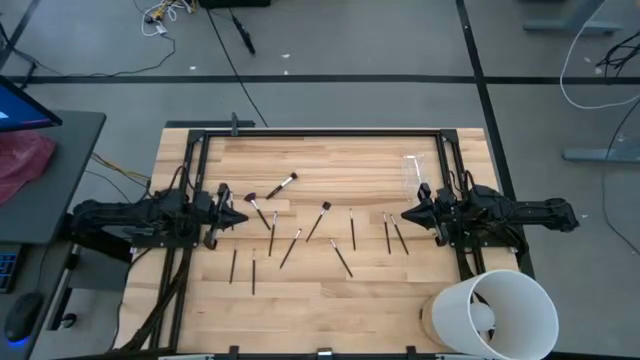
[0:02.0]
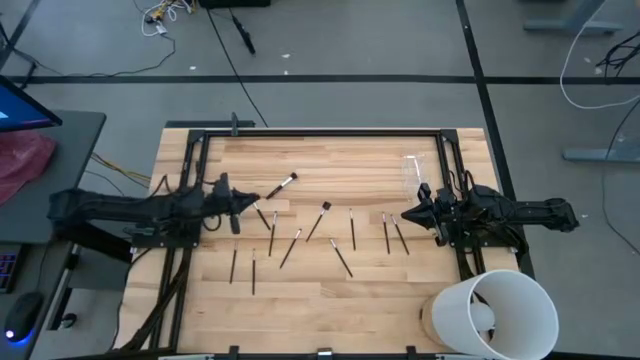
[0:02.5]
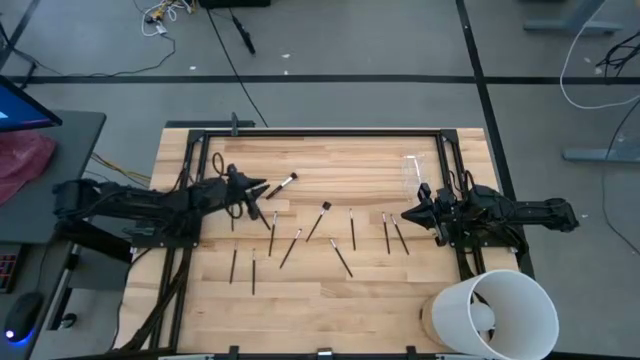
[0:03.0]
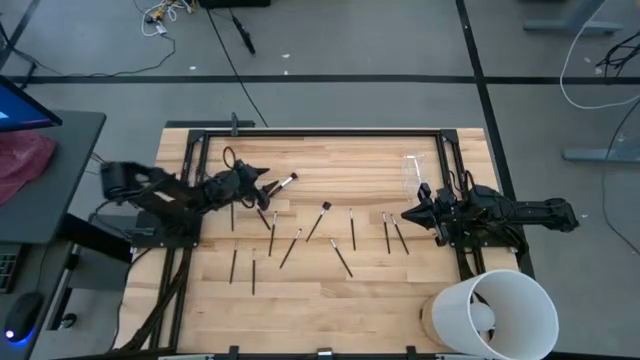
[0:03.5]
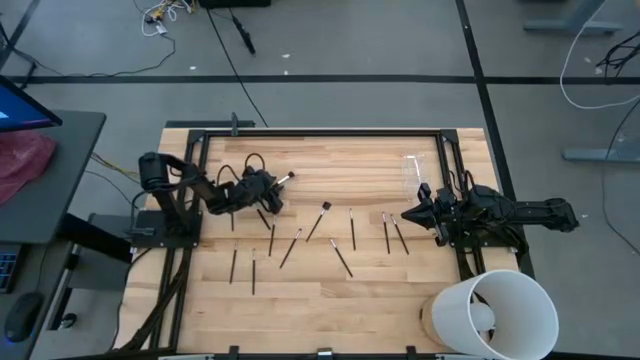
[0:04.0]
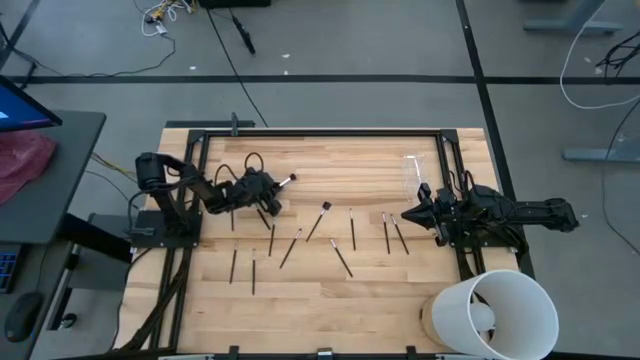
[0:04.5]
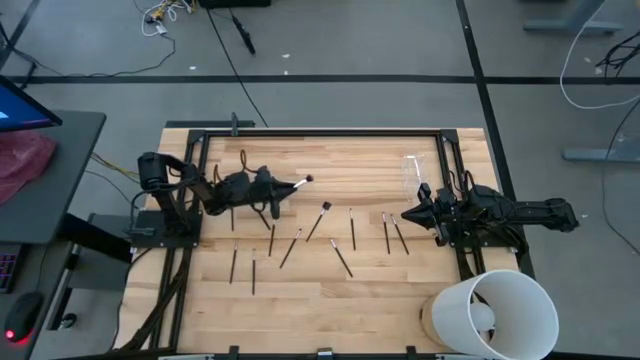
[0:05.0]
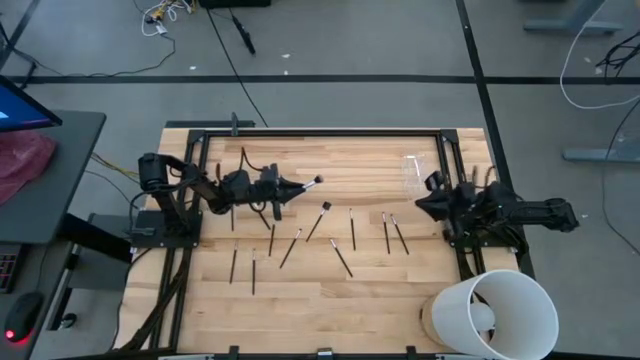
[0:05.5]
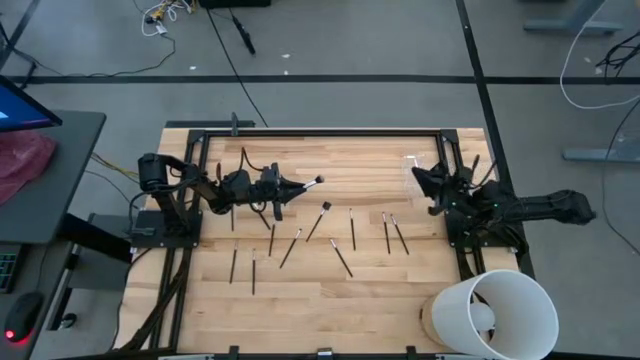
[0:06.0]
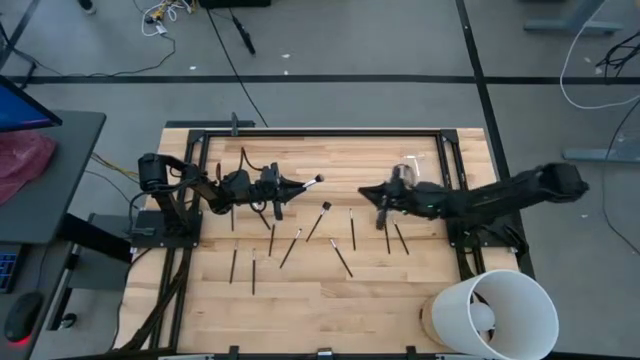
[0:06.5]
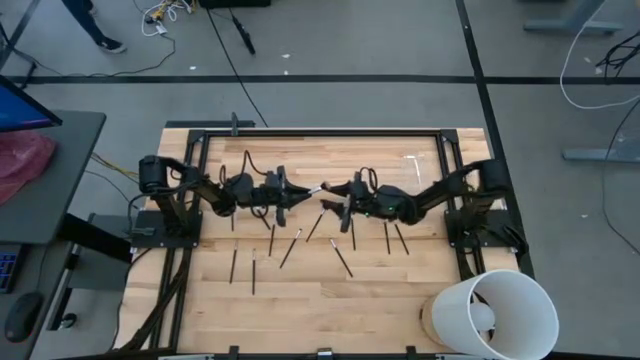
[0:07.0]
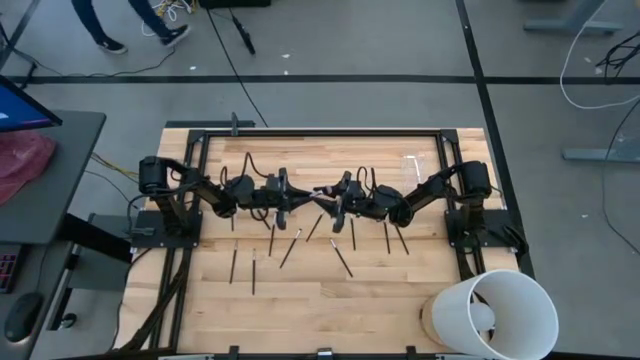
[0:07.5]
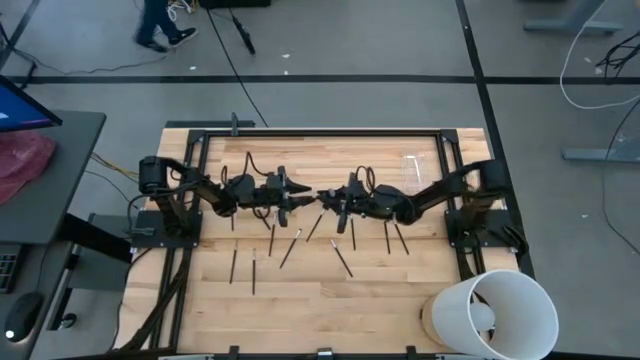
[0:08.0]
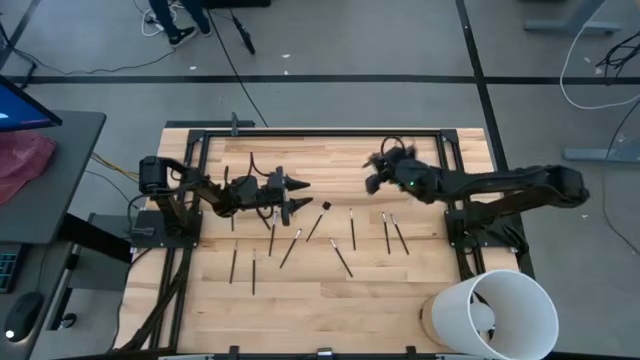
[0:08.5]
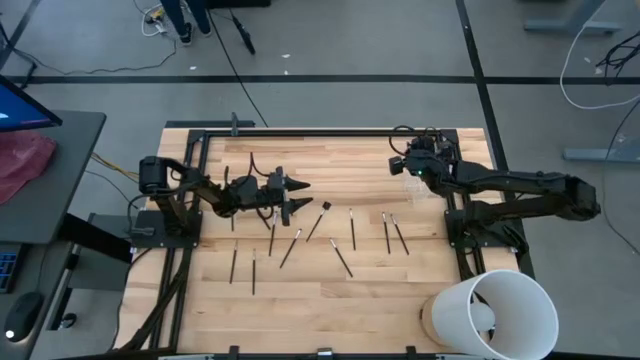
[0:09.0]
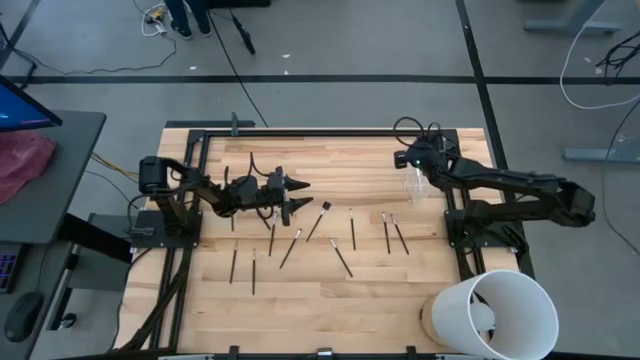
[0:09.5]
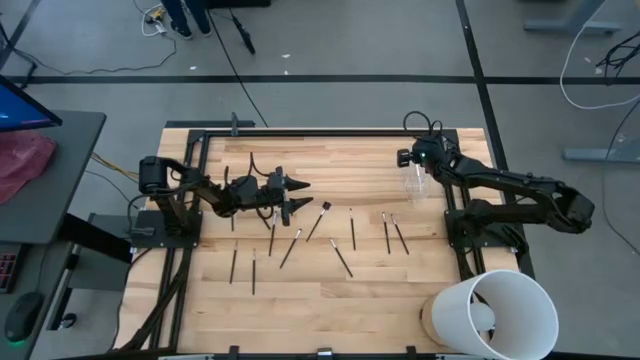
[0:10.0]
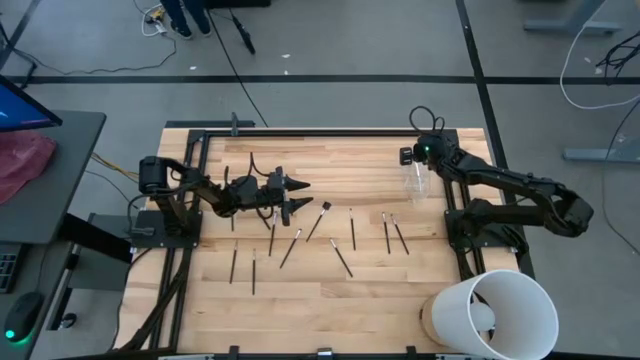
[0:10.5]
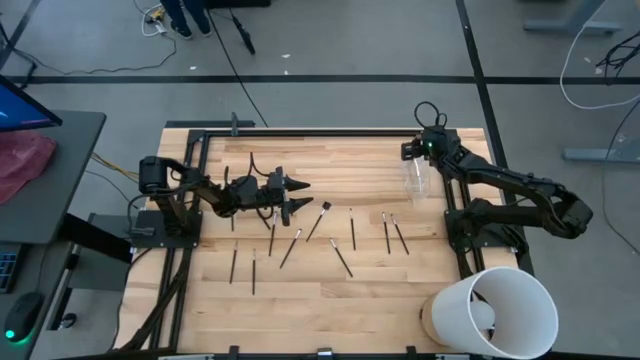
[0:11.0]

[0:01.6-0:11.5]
Task: Put items in baskets/containers
Put the powder brush into the transparent organizer

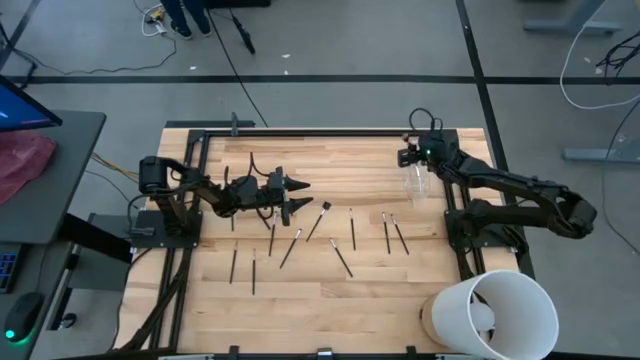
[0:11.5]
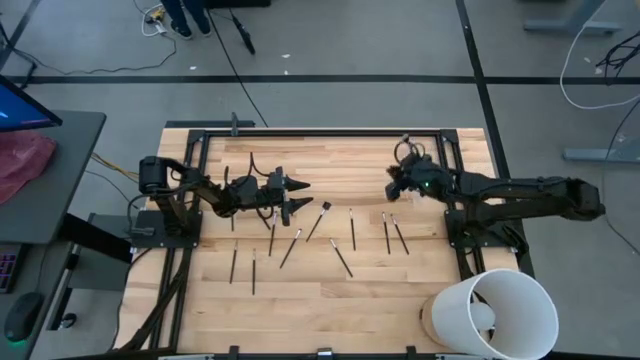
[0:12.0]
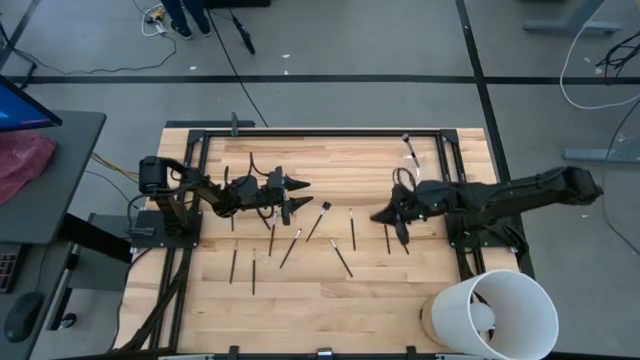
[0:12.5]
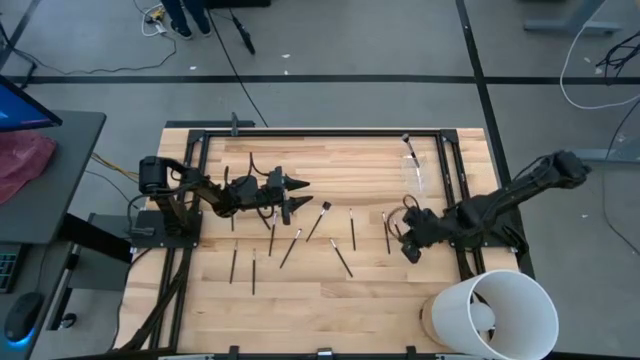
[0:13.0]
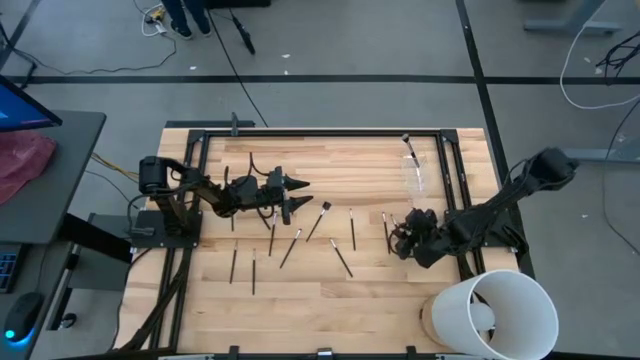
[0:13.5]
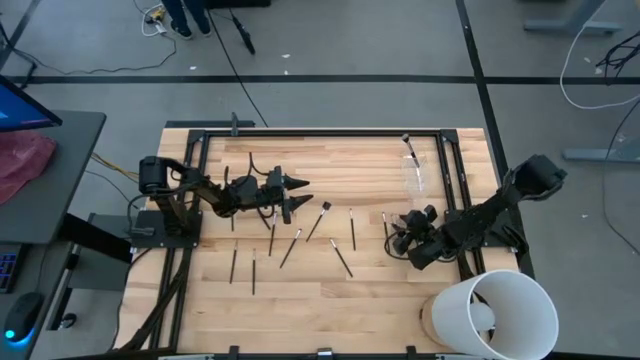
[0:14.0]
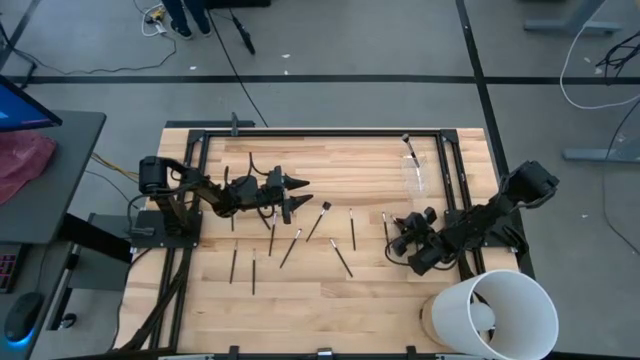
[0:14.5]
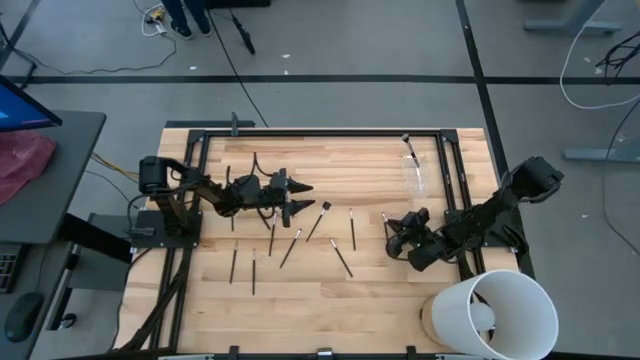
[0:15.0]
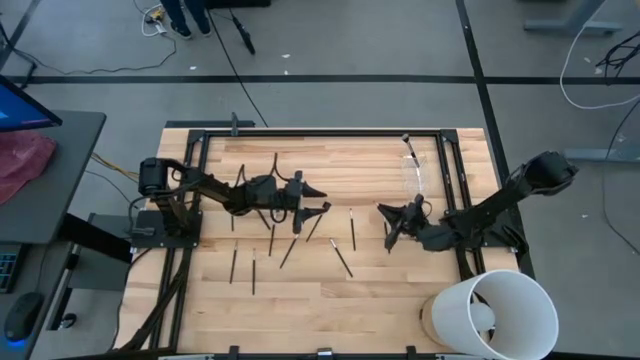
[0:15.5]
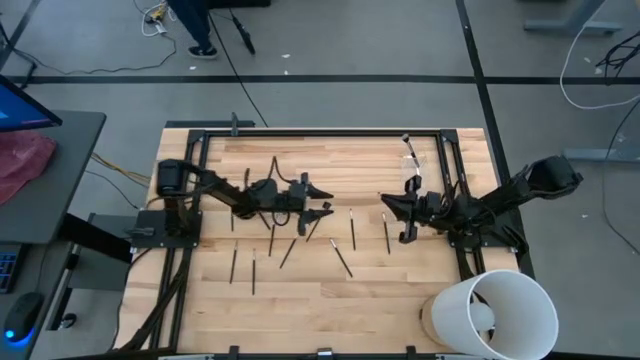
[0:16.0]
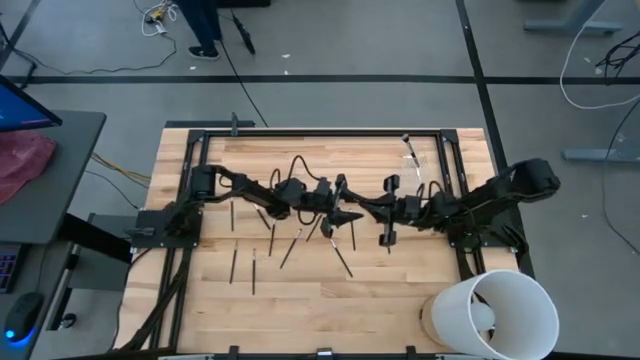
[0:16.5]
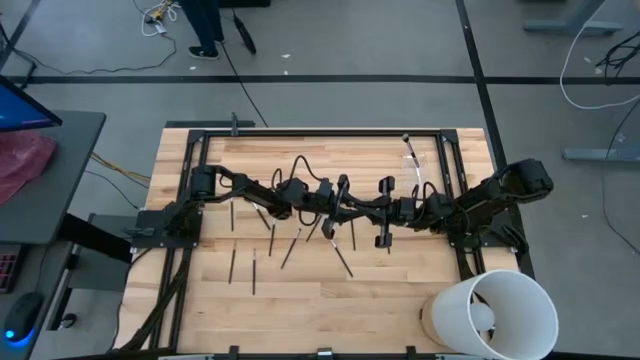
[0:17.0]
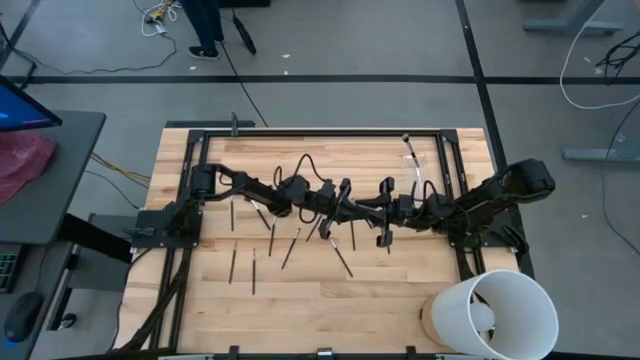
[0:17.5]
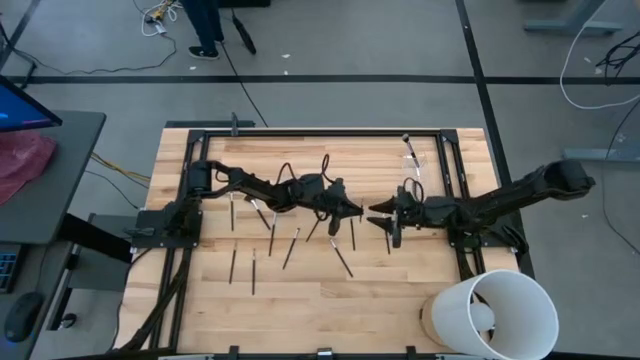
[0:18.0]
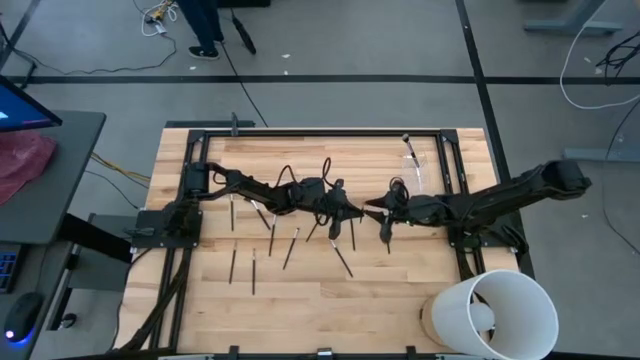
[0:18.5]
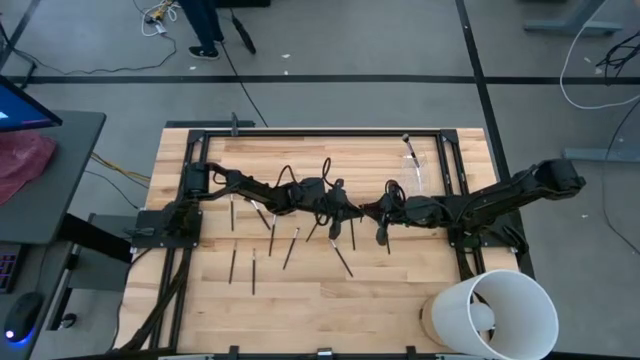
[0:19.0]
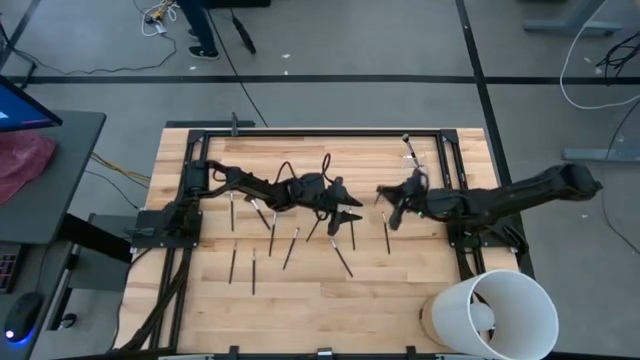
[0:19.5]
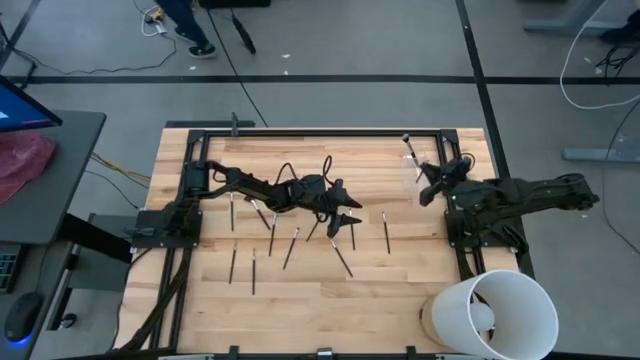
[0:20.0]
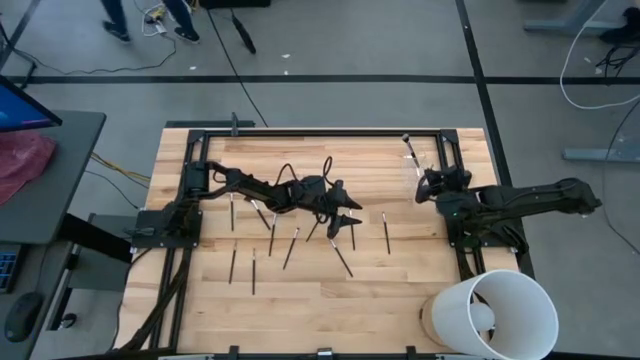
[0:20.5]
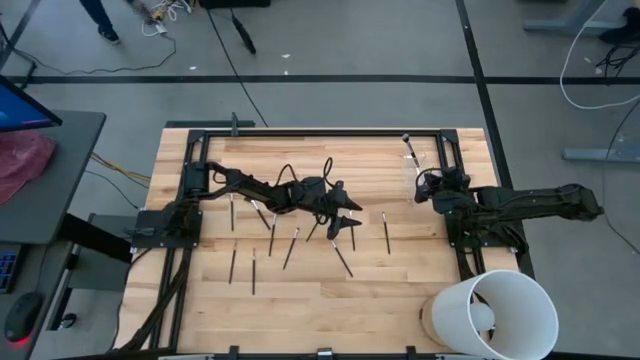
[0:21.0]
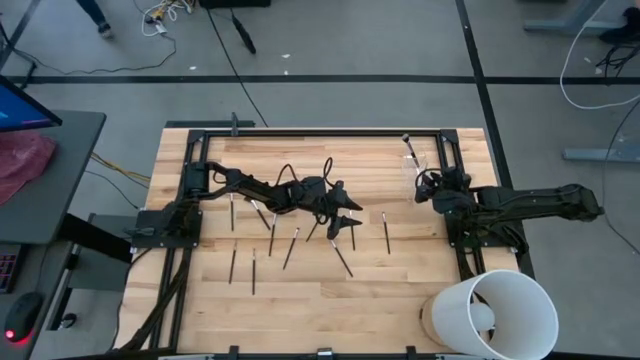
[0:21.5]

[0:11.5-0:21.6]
Put the eyeshadow brush into the transparent organizer

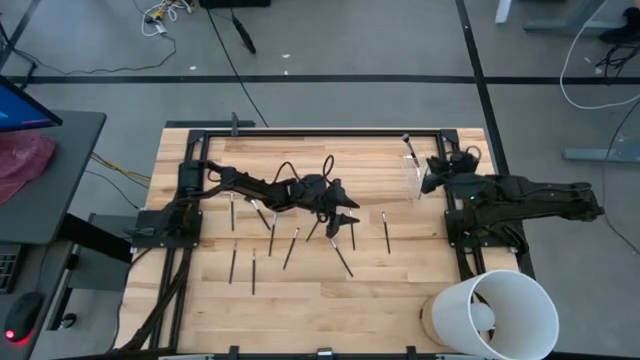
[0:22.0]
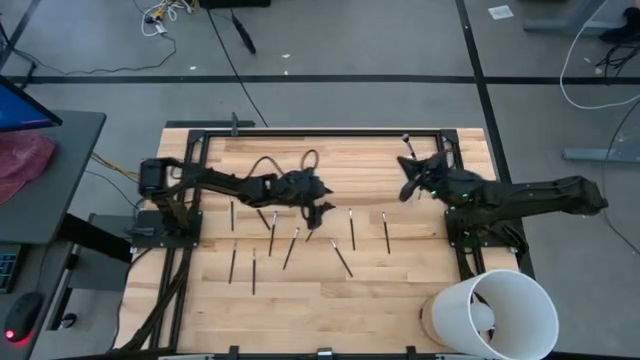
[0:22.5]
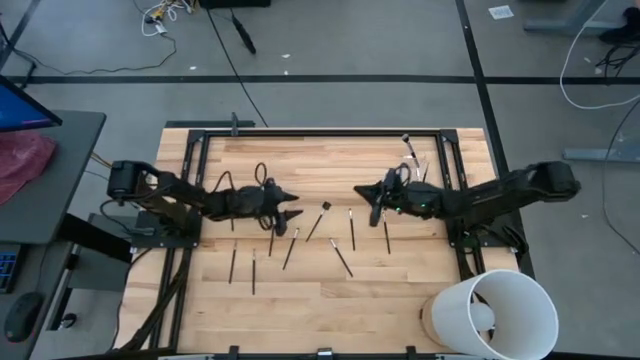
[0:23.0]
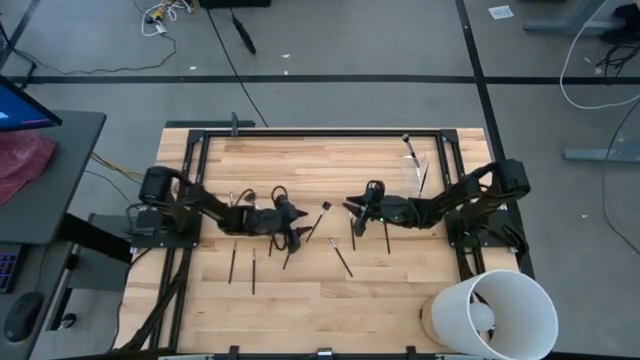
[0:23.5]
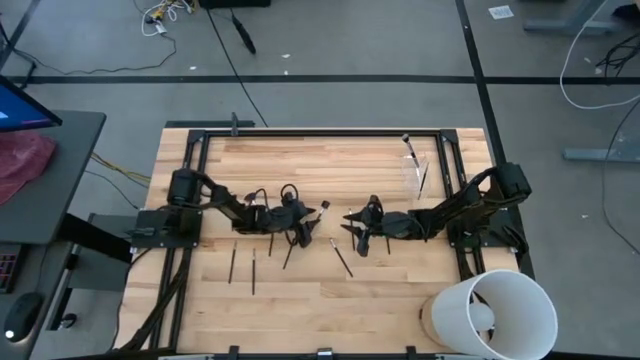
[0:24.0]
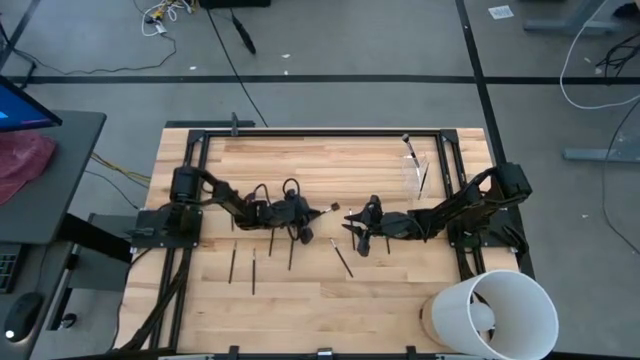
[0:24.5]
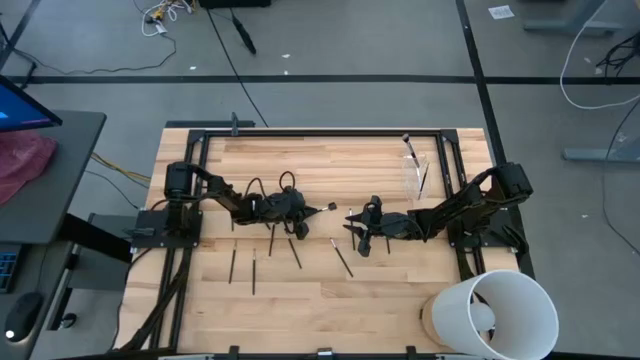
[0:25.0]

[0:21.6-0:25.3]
Put the eye groomer brush into the transparent organizer
